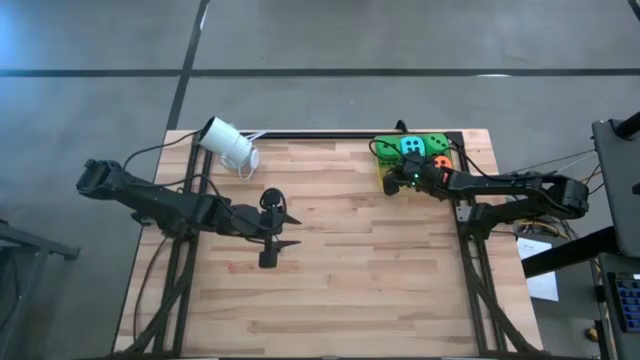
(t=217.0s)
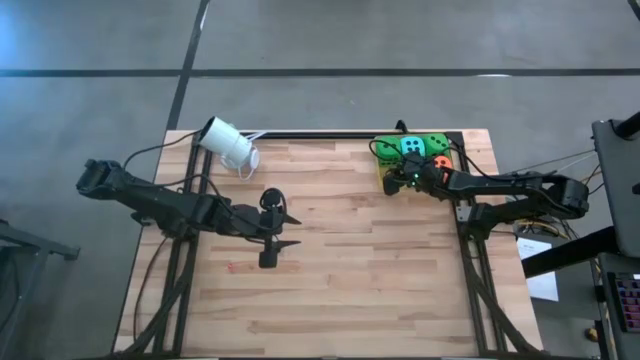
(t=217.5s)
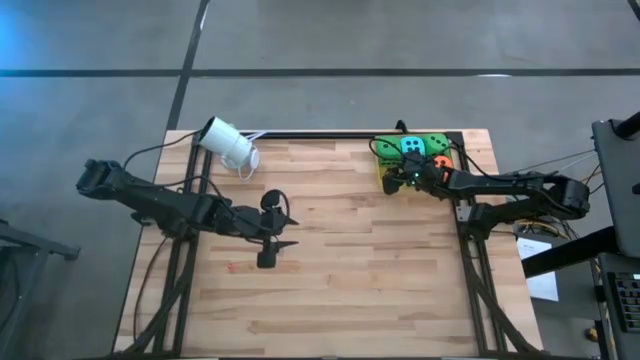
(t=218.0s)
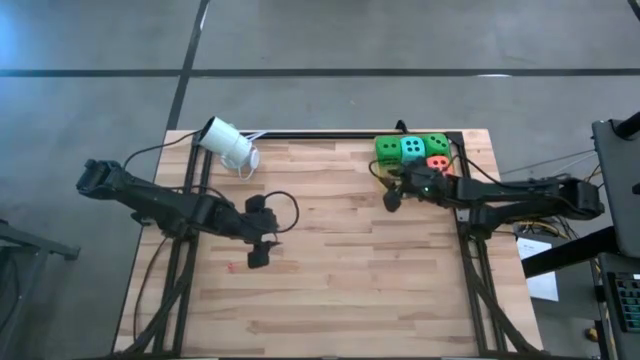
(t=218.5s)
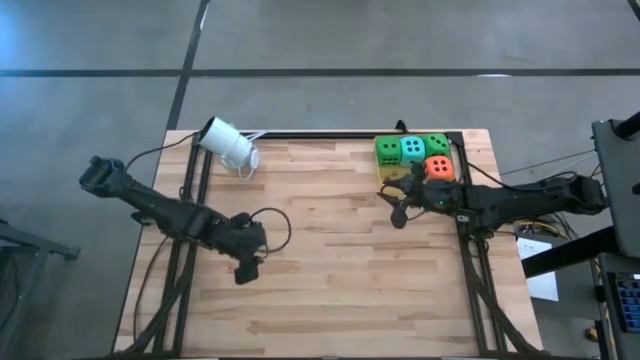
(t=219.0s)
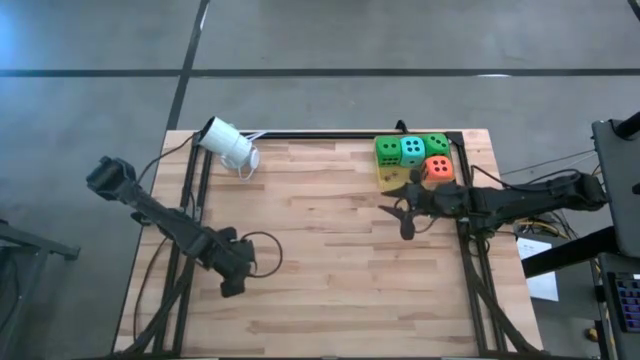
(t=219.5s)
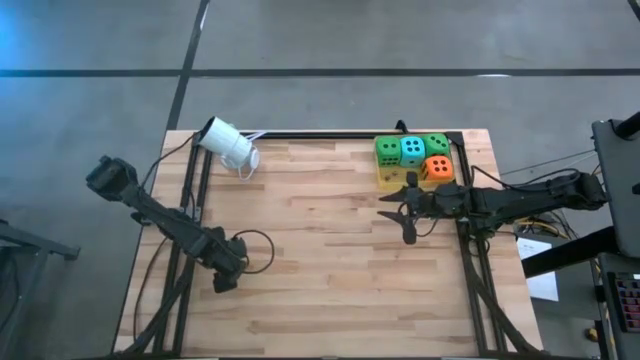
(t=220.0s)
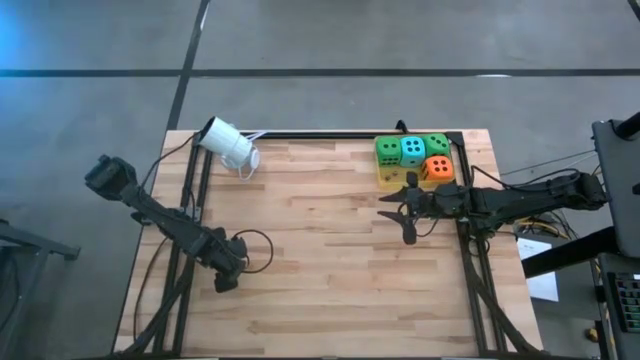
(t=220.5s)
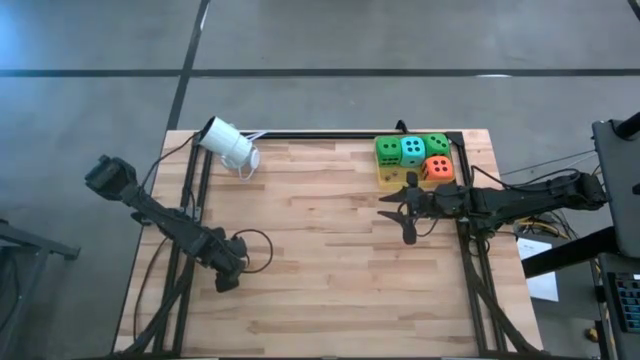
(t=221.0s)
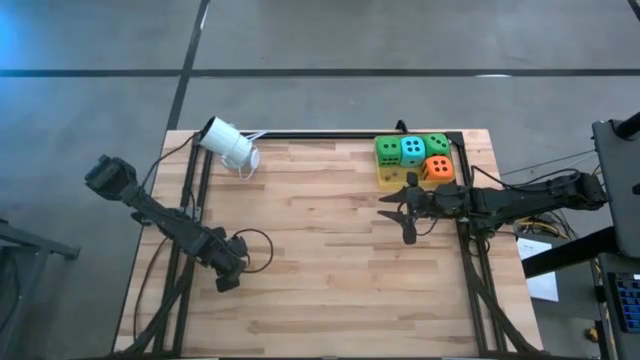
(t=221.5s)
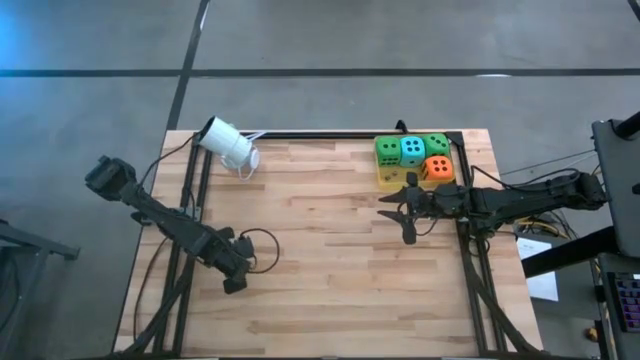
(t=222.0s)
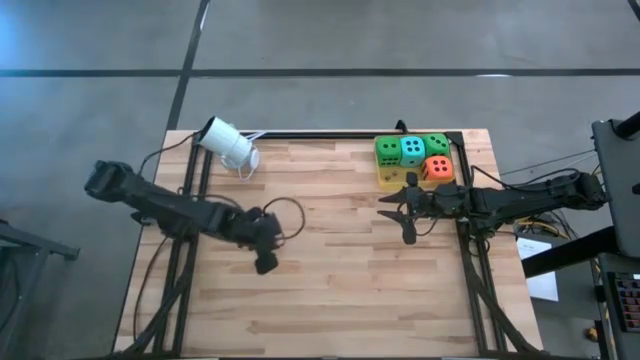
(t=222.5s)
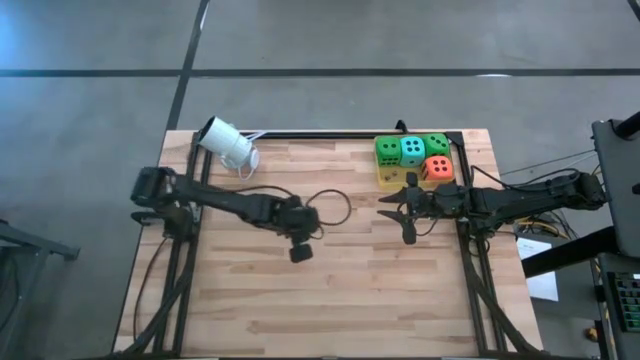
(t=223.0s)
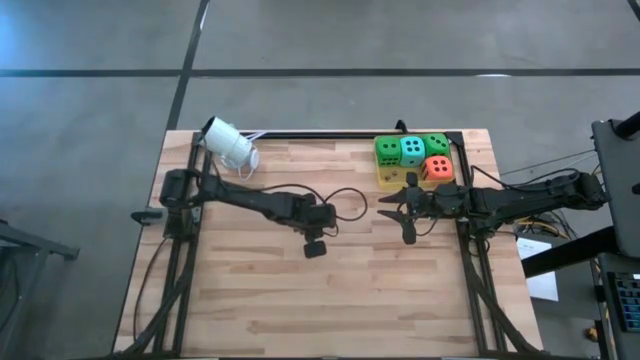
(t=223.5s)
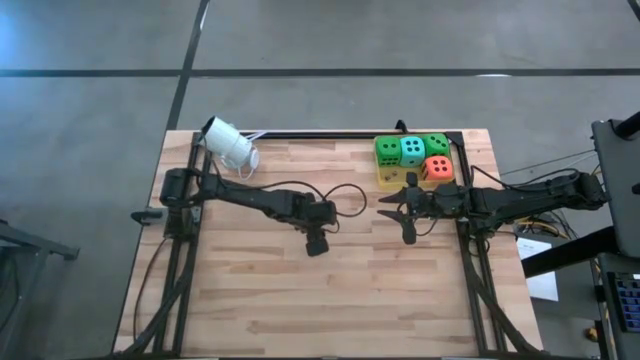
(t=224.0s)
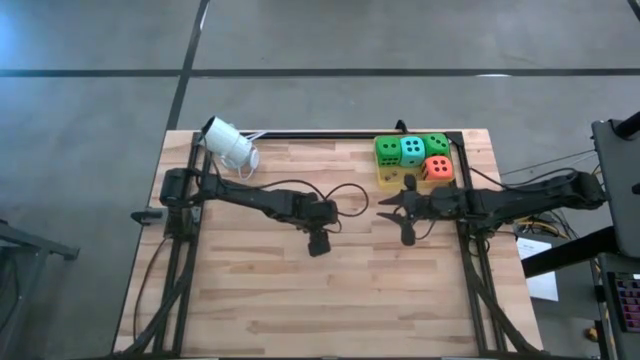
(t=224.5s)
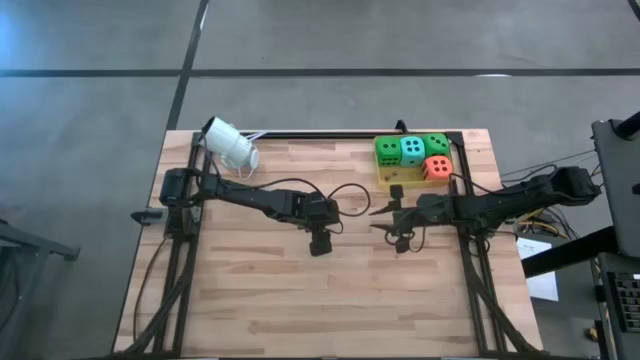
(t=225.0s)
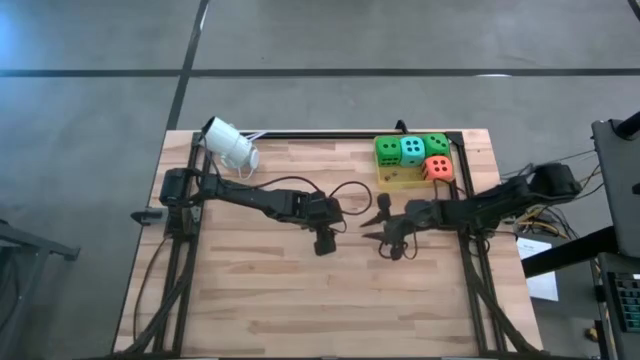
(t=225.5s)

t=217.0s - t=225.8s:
Task: Pick & Place Dice
Put the small red dice into the yellow bin

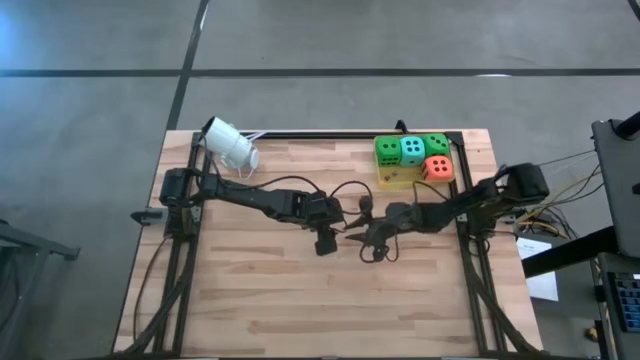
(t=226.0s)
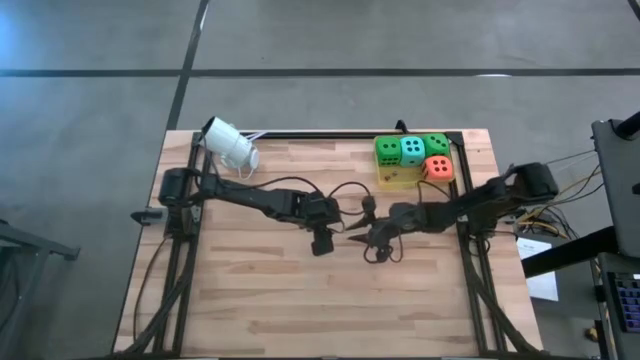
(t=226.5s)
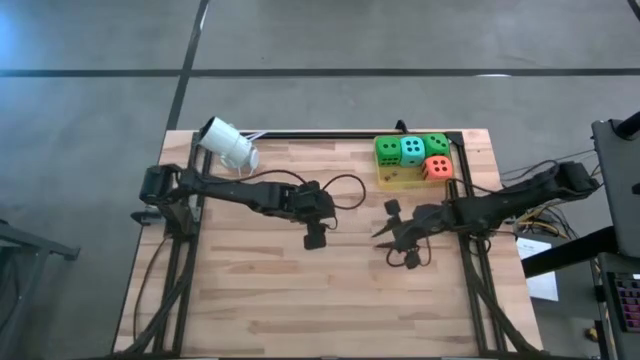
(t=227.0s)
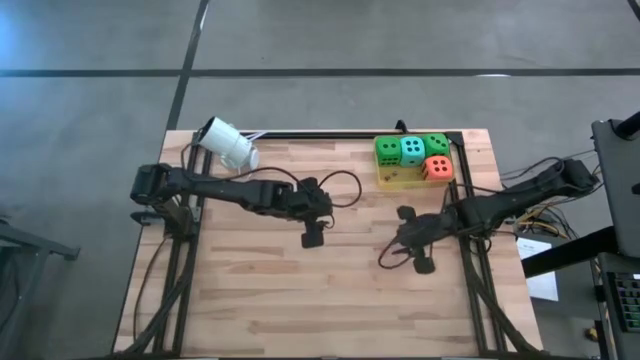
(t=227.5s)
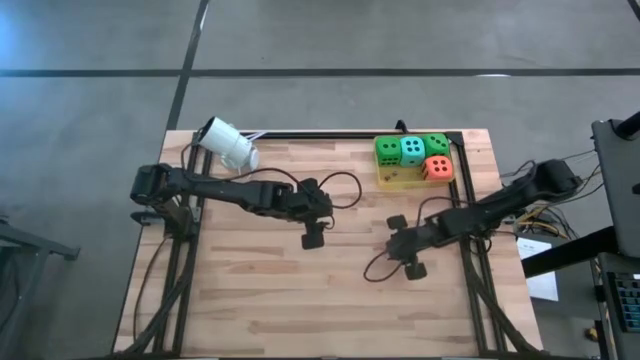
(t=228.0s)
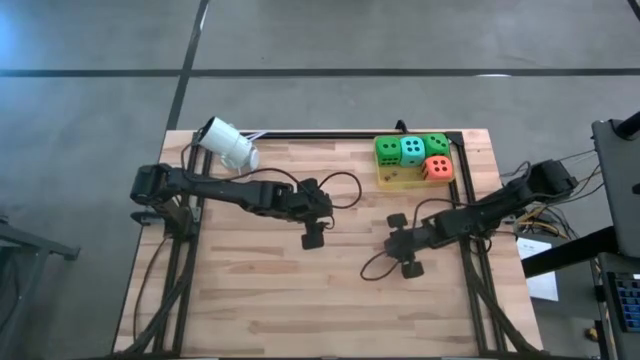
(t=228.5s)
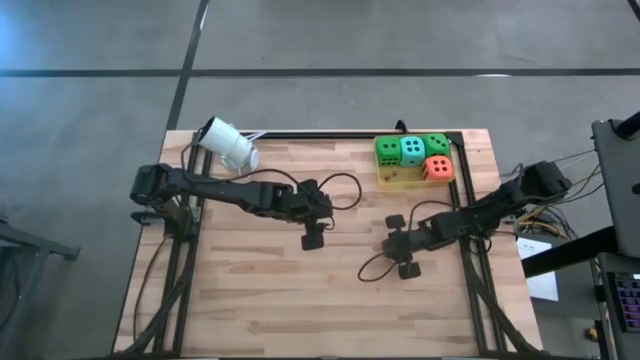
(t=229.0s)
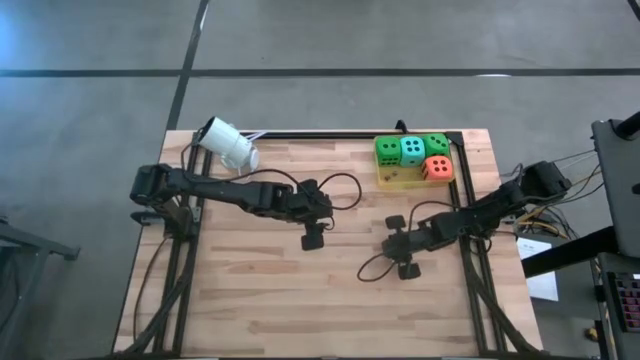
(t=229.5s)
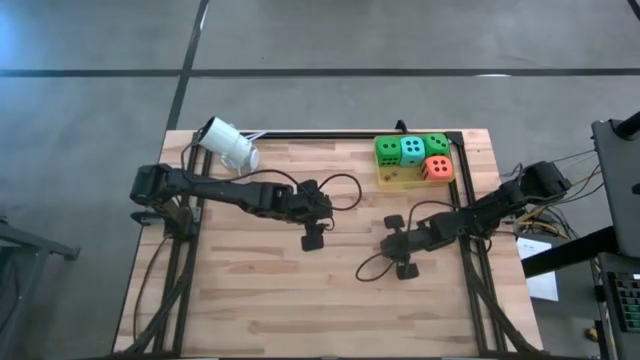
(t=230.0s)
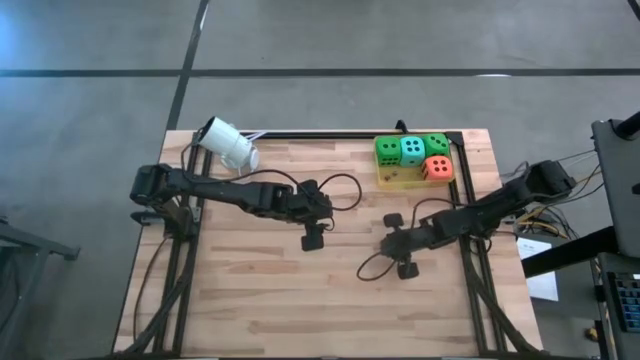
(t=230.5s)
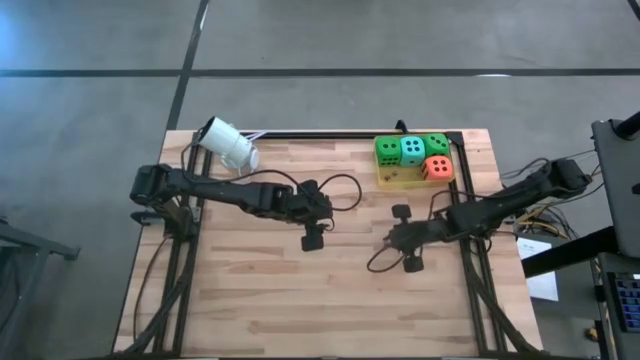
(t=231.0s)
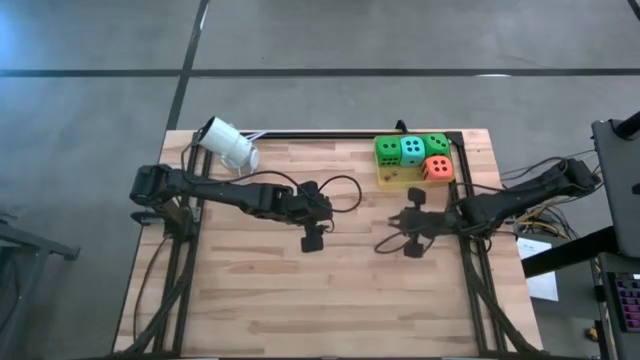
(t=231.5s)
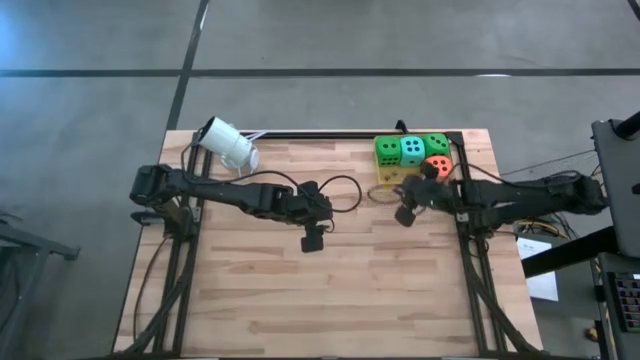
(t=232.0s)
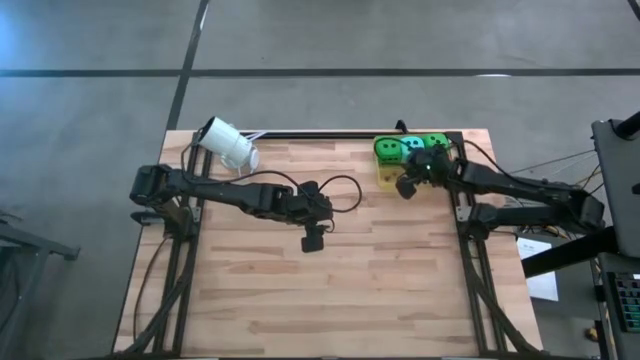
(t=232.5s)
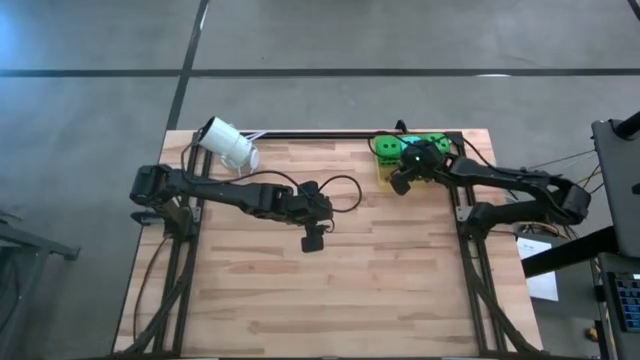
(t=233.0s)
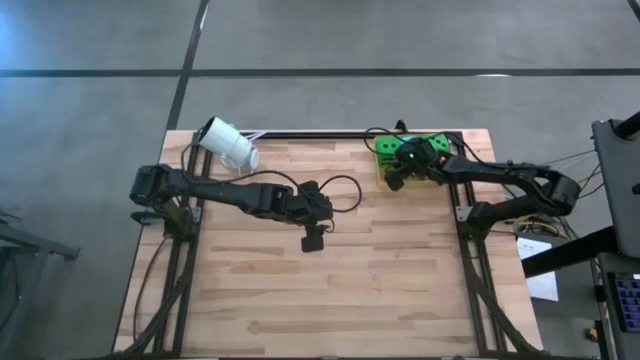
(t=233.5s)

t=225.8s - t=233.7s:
Put the small red dice into the yellow bin

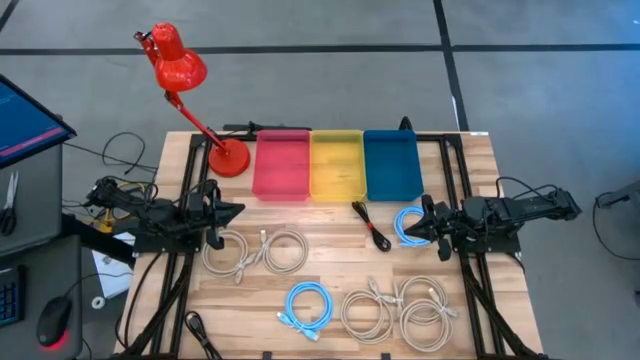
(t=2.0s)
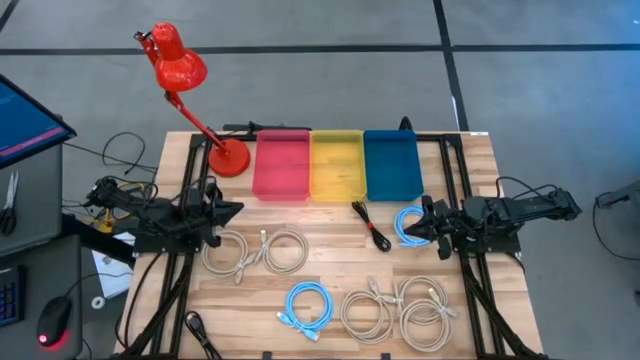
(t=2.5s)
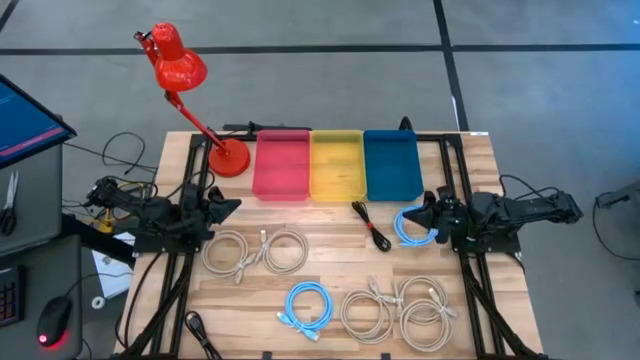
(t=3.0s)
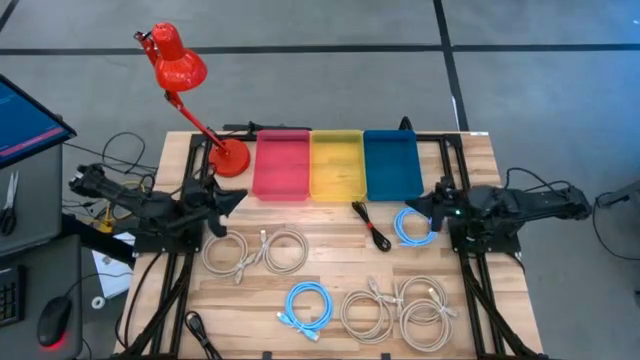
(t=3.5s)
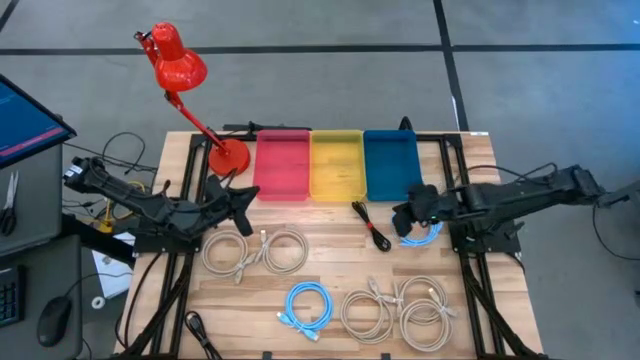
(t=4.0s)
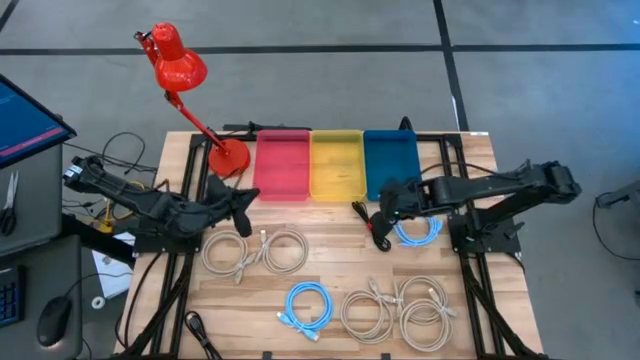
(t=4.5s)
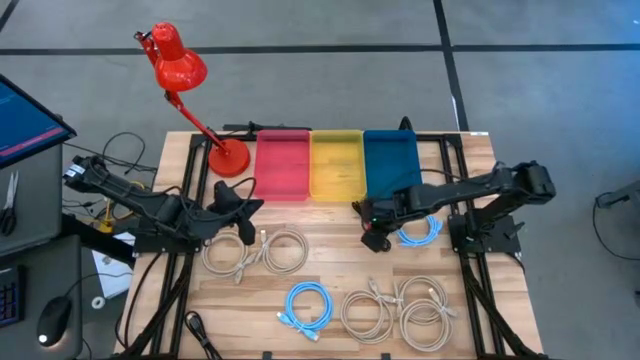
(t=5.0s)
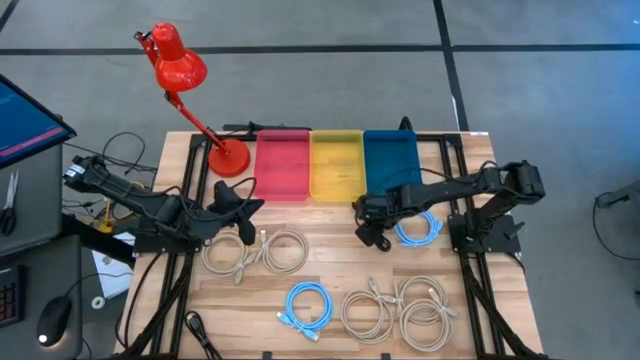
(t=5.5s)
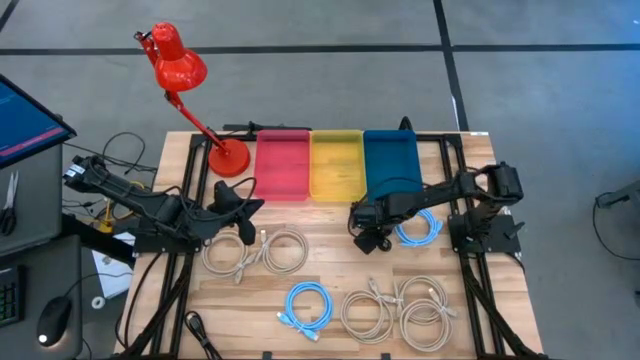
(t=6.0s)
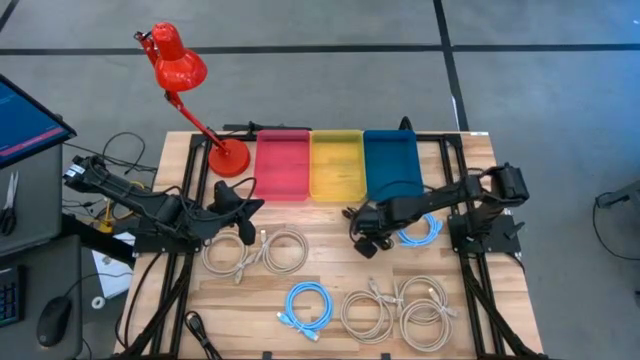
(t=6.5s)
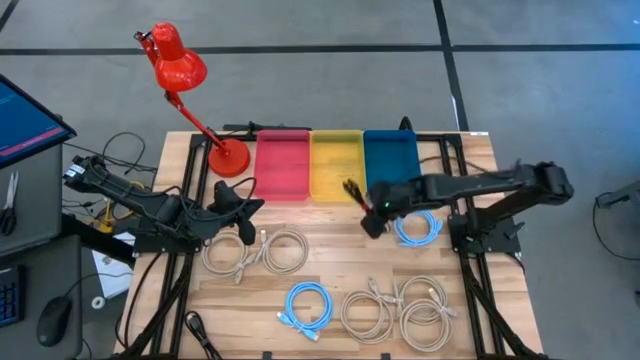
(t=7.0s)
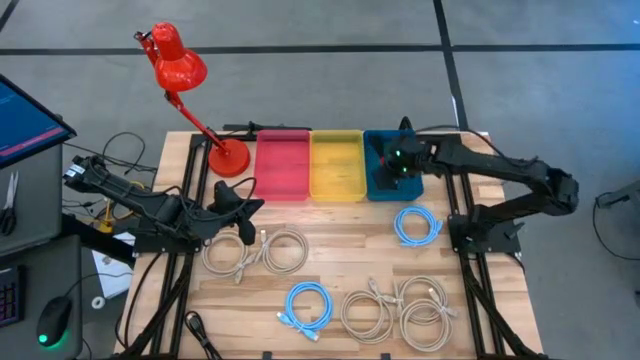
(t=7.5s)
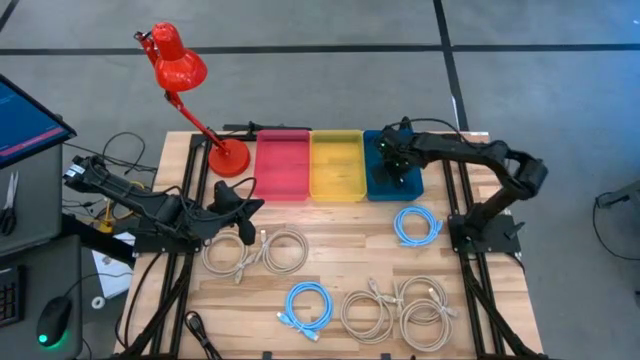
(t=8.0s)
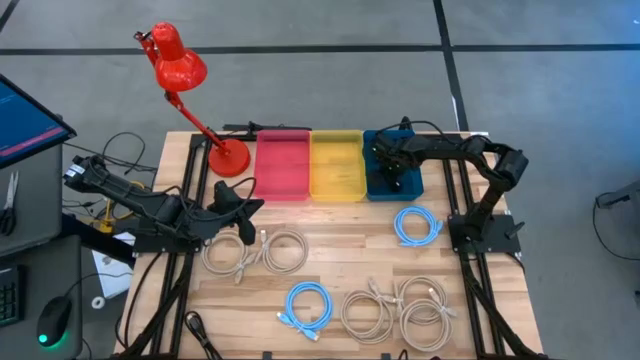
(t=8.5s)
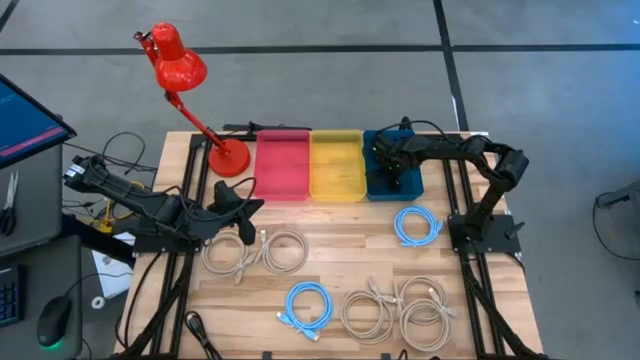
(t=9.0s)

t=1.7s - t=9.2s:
Task: Pick & Place USB Port
Put the top right black charger cable into the blue bin
